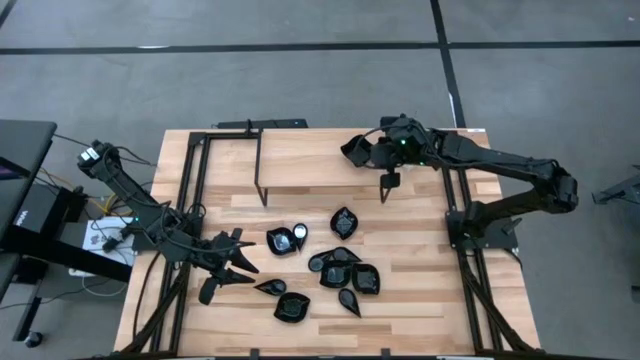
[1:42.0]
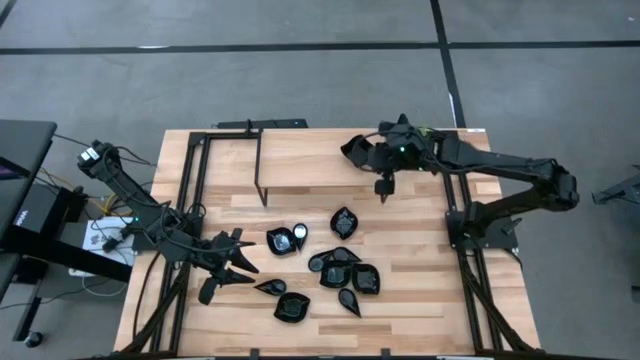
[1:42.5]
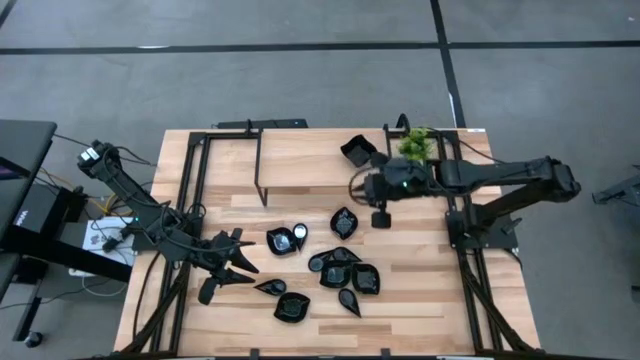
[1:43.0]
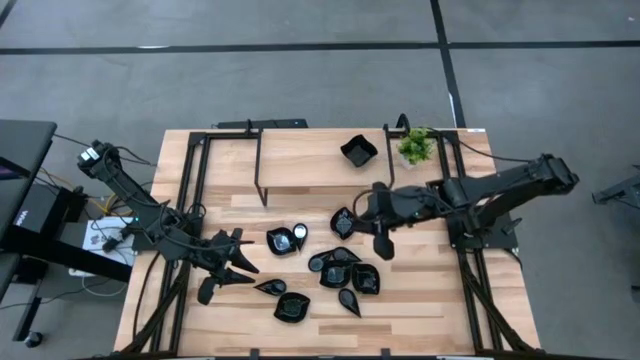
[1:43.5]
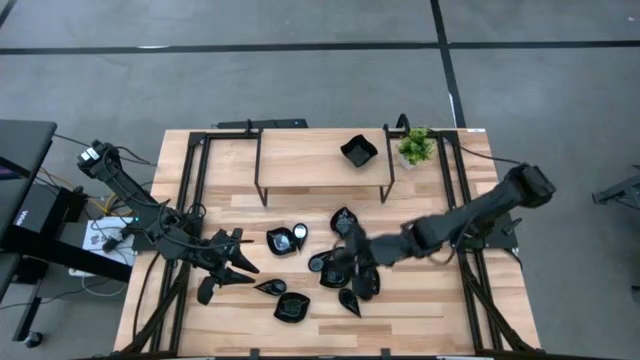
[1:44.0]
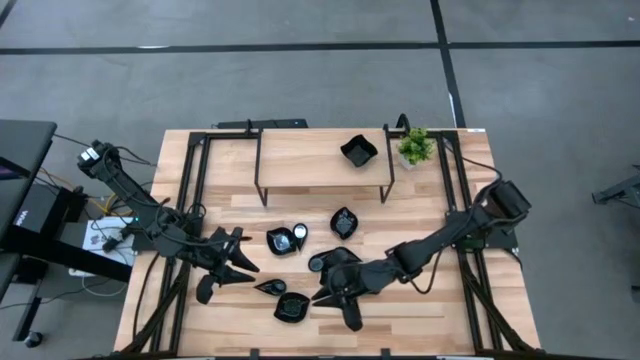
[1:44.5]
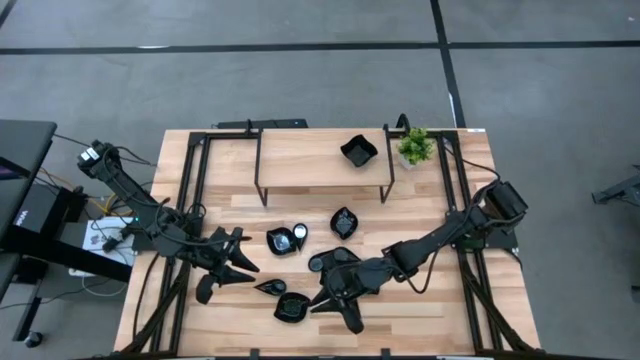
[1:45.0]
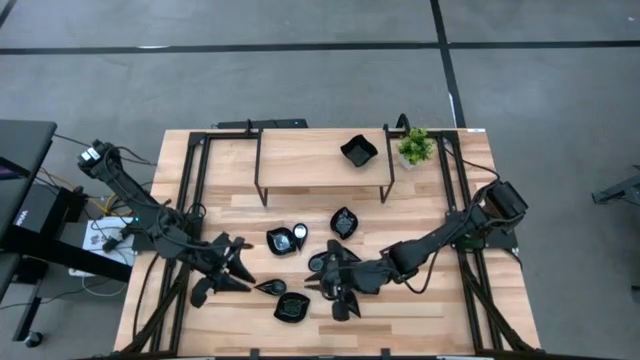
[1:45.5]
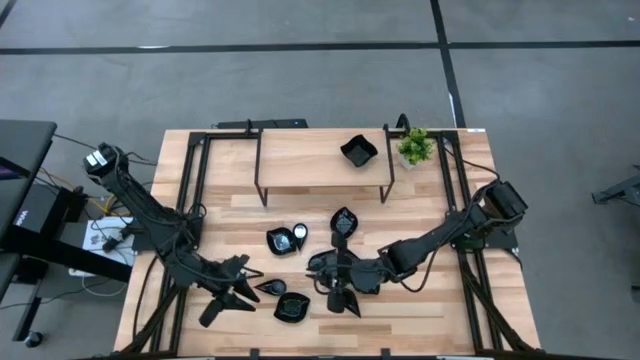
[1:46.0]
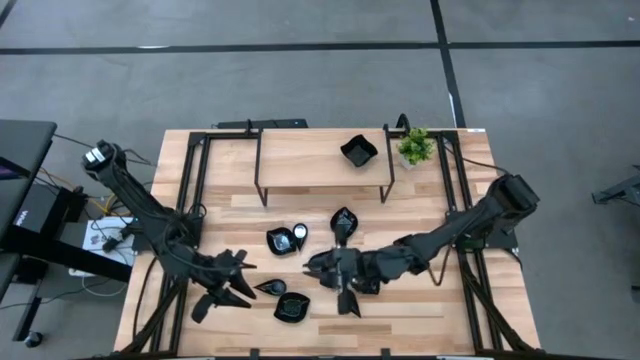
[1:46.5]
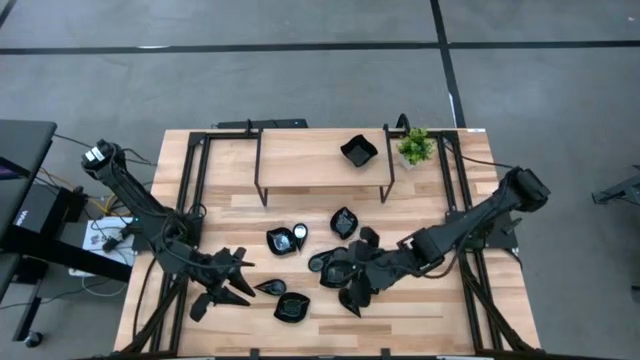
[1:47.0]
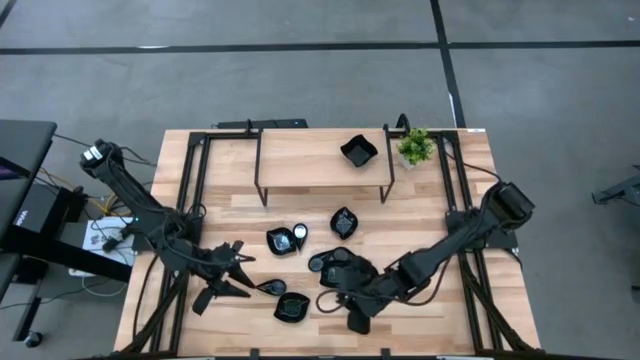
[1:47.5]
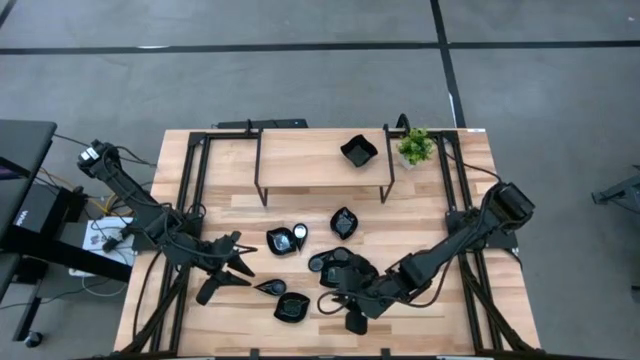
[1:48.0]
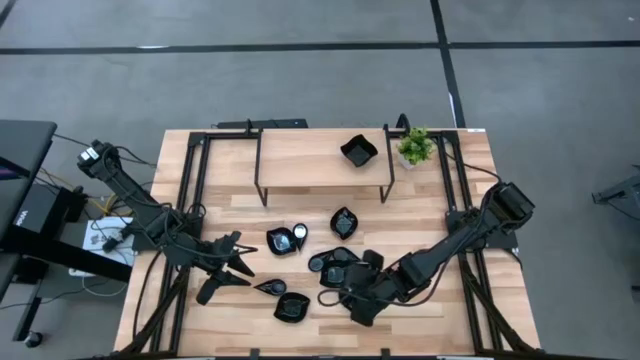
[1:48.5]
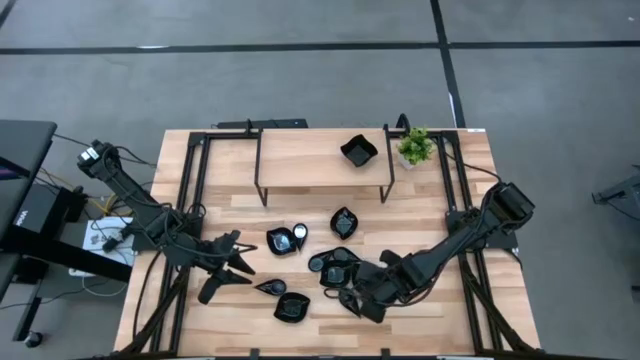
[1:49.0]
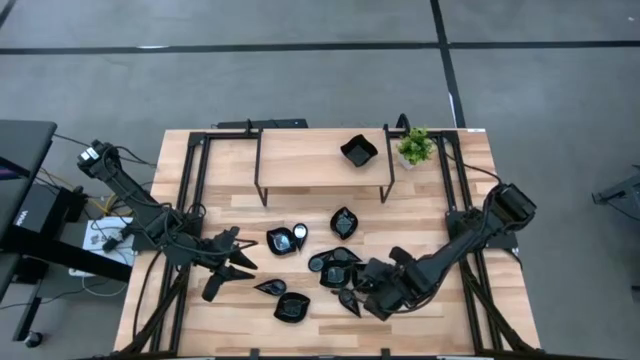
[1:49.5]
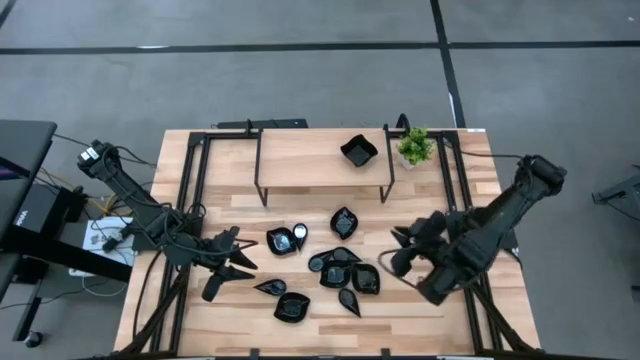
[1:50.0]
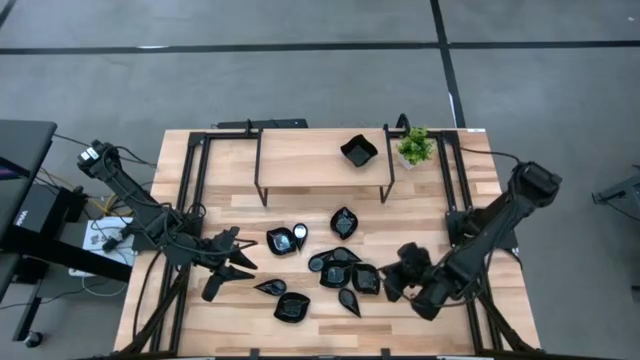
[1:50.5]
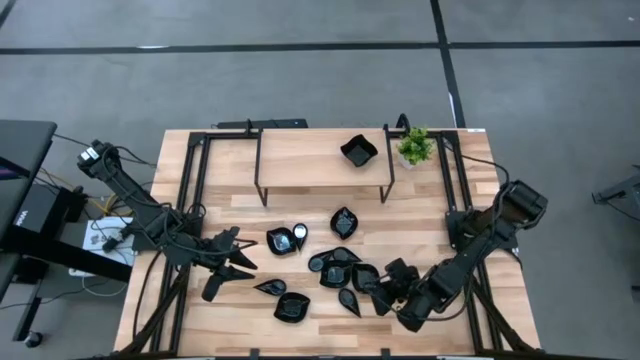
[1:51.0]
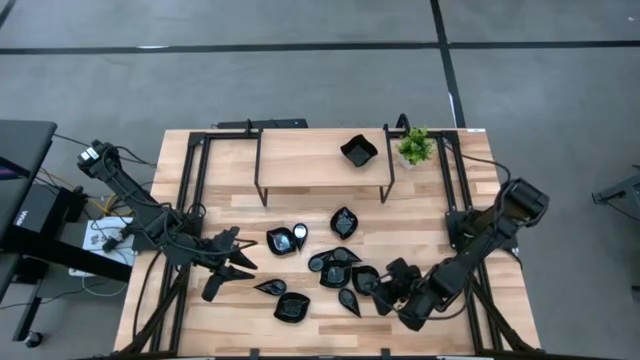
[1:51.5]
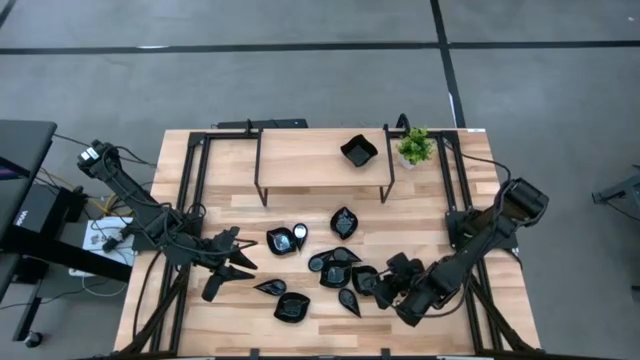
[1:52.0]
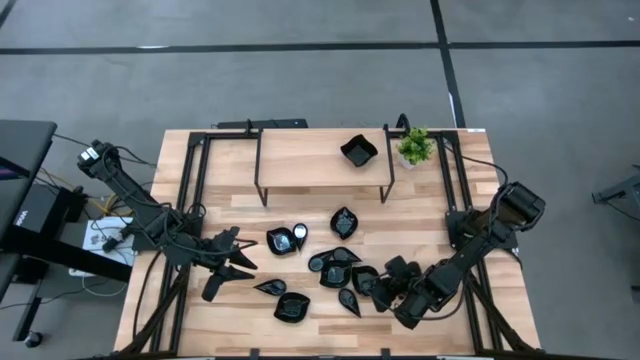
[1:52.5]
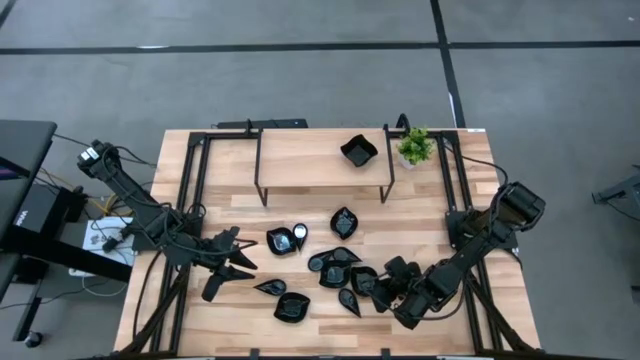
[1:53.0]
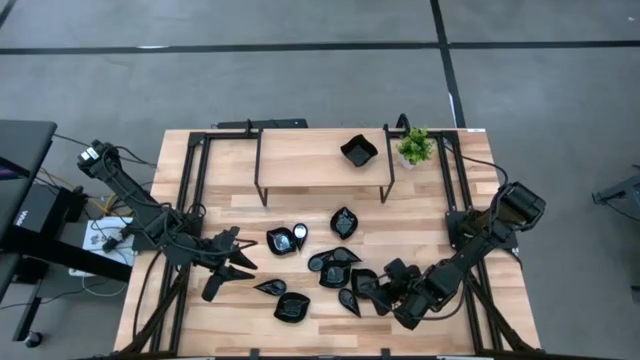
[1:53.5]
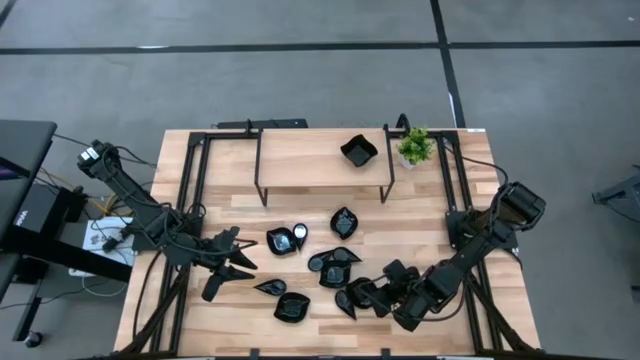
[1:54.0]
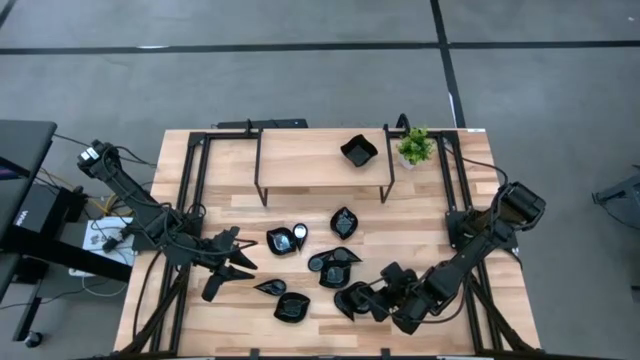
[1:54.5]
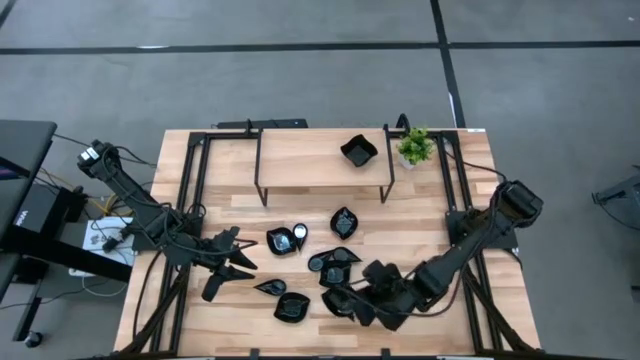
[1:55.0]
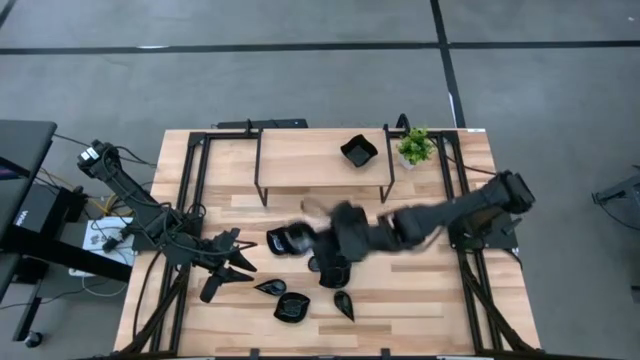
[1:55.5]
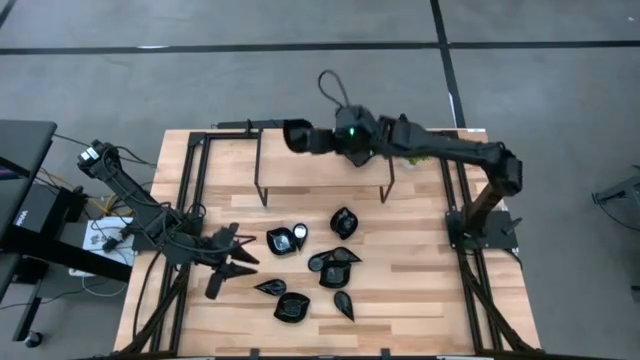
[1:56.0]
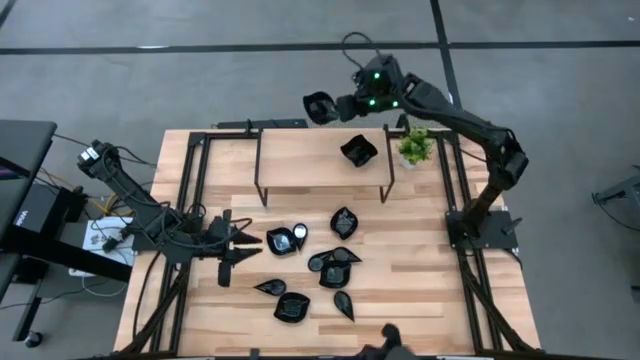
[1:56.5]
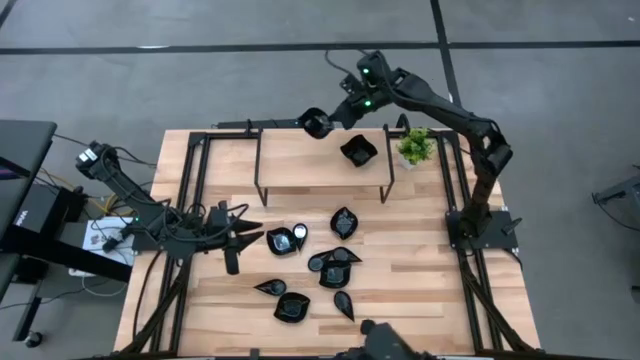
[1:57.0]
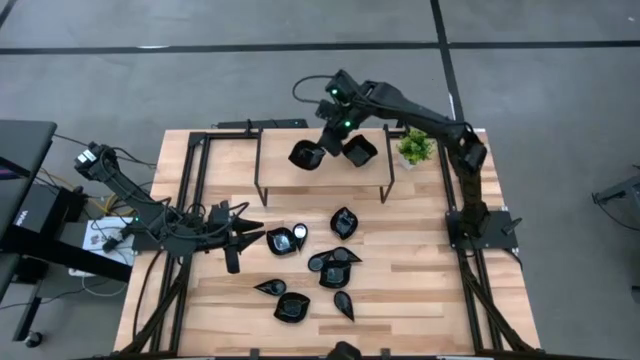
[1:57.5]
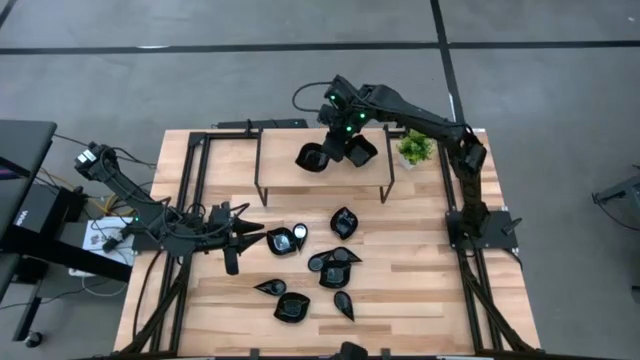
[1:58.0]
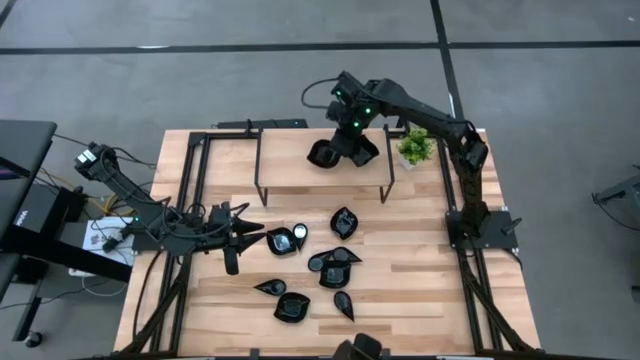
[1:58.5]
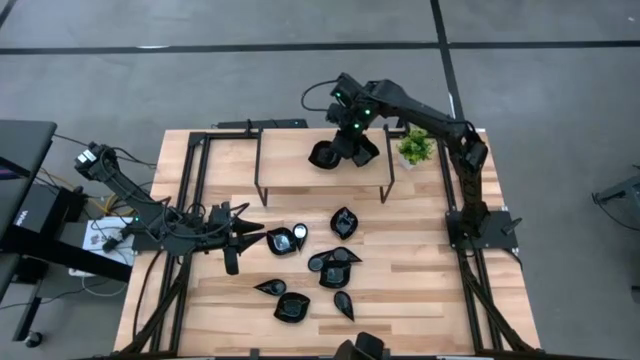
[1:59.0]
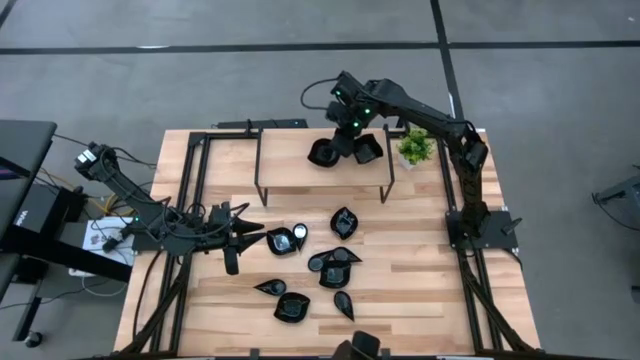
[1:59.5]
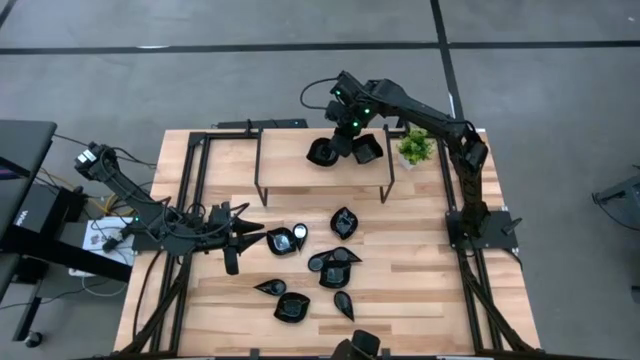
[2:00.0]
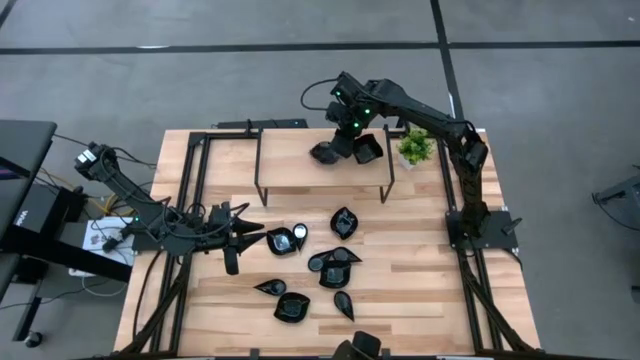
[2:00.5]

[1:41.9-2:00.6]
Task: Pick & Place Mini shaped plates
Put the black leaf shaped plate on the shelf

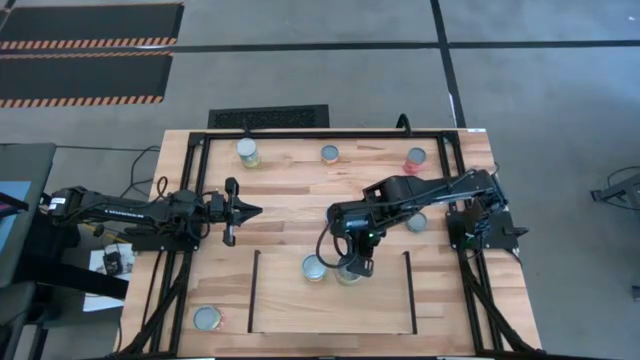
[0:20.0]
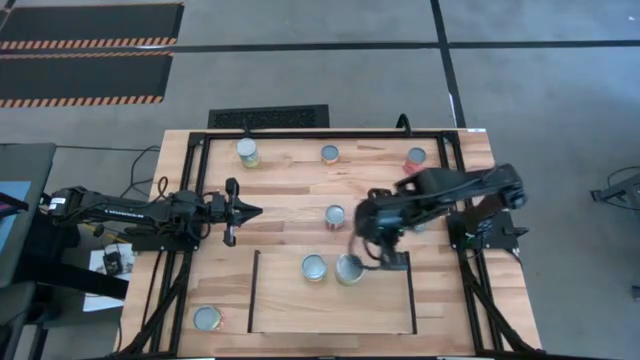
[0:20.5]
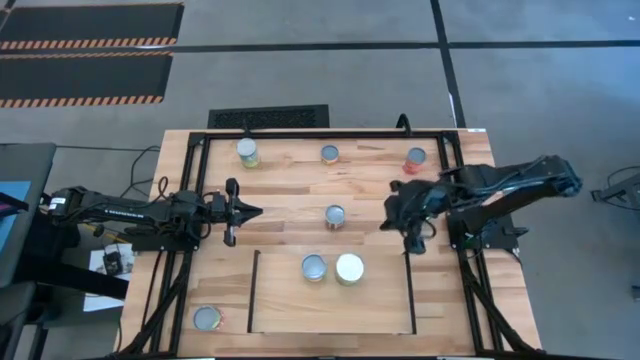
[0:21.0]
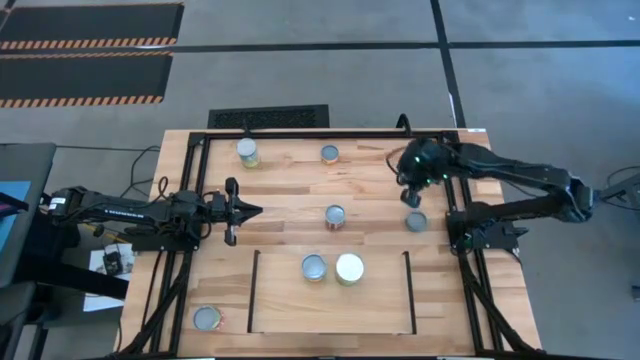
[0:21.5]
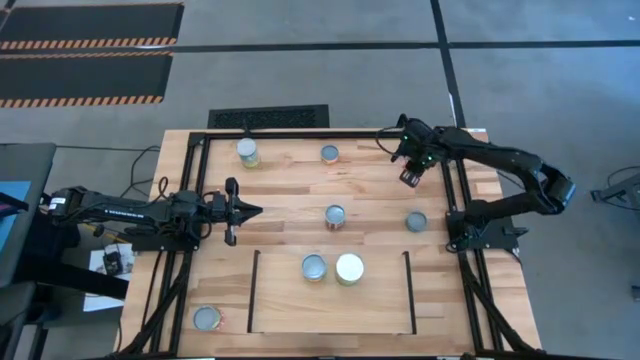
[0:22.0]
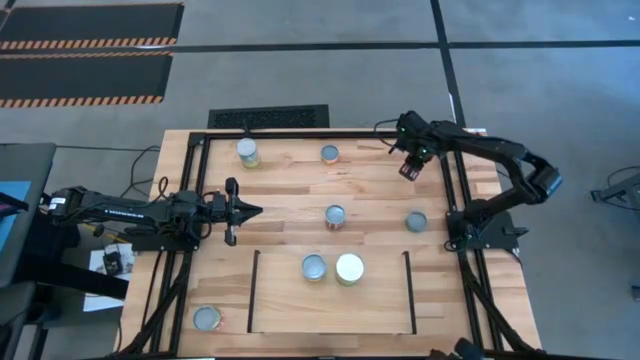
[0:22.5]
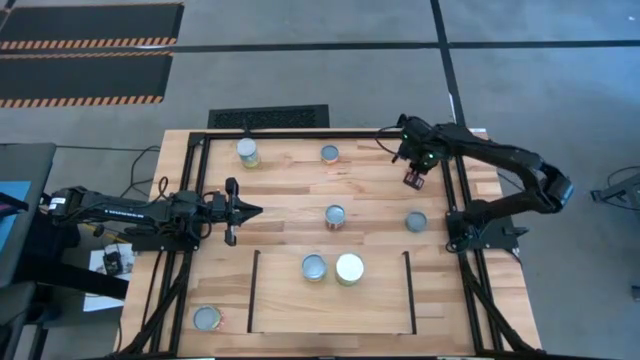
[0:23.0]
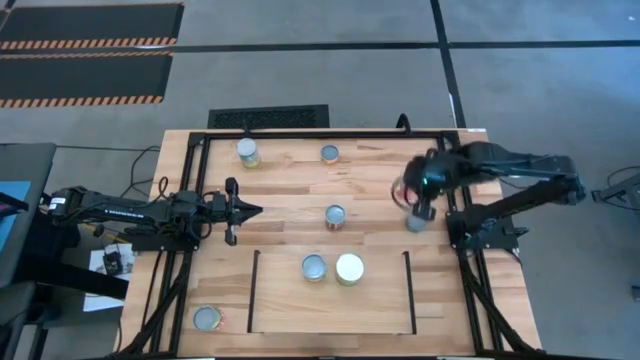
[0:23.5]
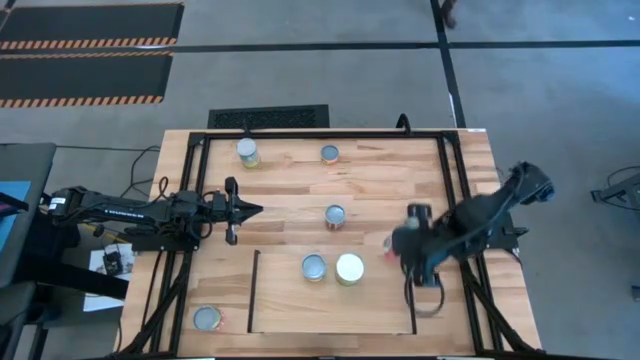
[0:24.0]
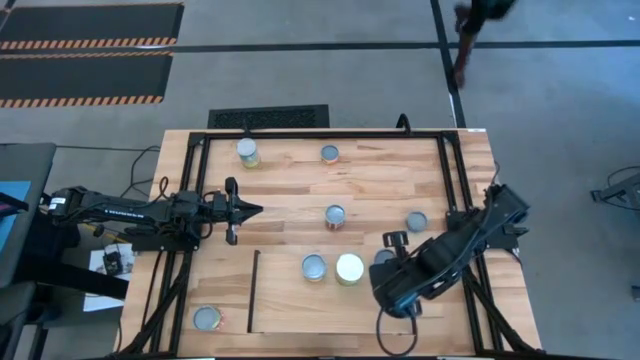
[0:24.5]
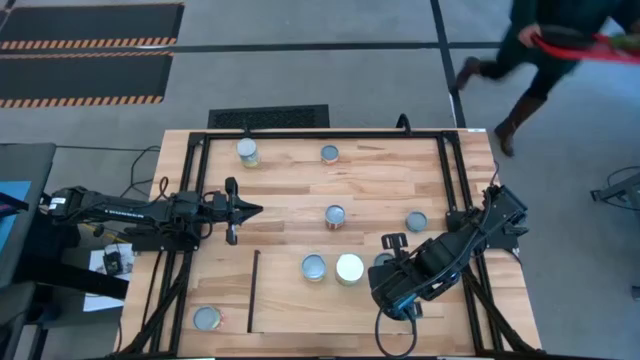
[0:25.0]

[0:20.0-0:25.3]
Task: Pick and place cans onto a shelf
Put the red mixed fruit can on the shelf
